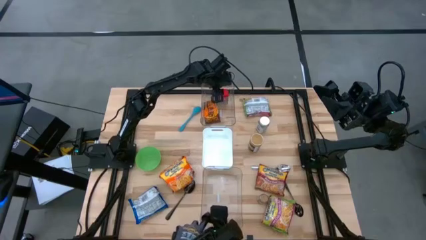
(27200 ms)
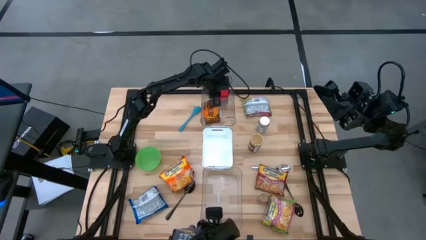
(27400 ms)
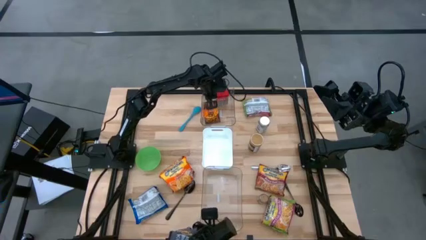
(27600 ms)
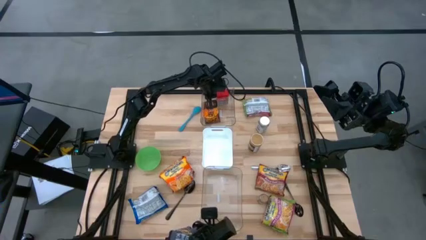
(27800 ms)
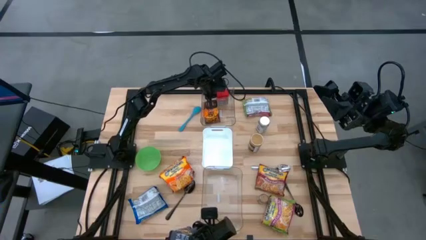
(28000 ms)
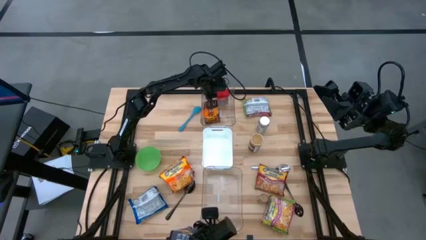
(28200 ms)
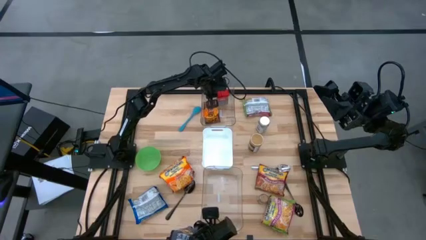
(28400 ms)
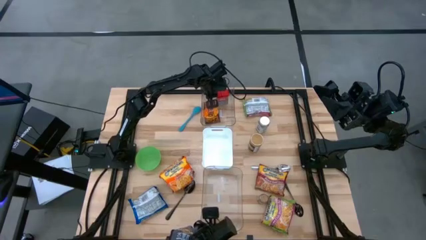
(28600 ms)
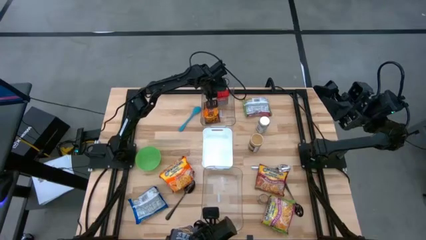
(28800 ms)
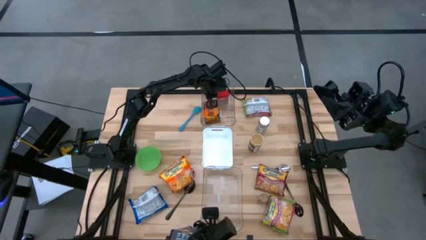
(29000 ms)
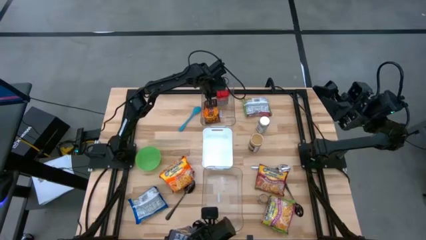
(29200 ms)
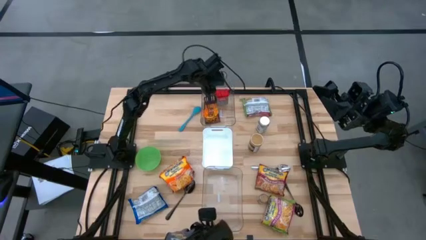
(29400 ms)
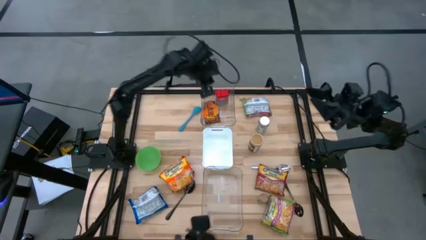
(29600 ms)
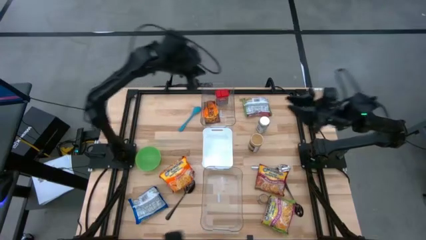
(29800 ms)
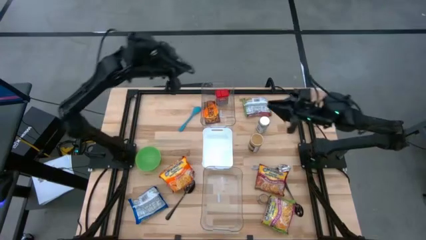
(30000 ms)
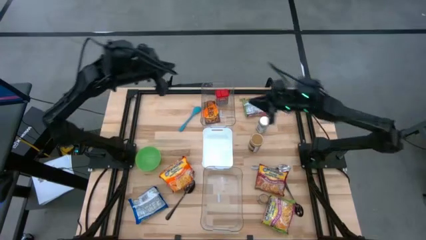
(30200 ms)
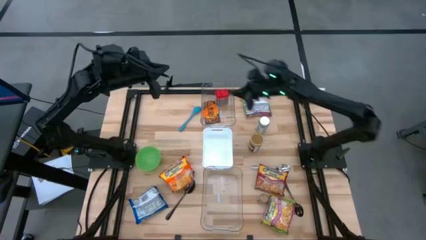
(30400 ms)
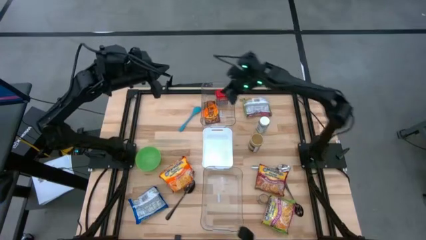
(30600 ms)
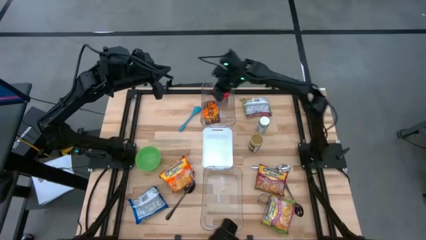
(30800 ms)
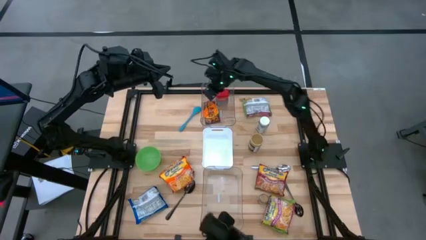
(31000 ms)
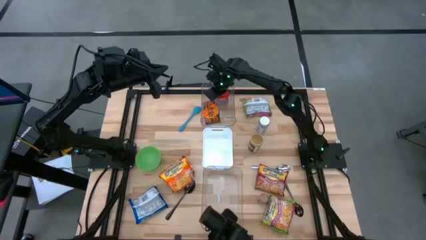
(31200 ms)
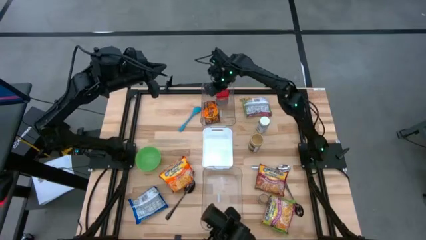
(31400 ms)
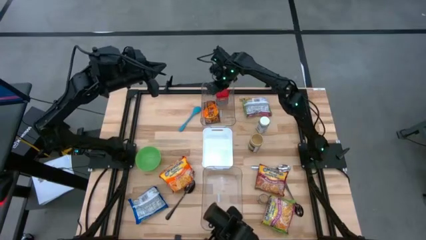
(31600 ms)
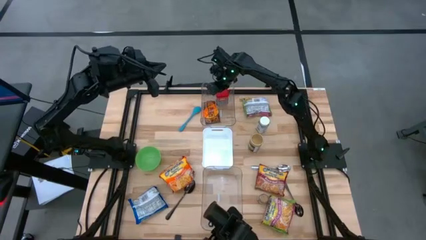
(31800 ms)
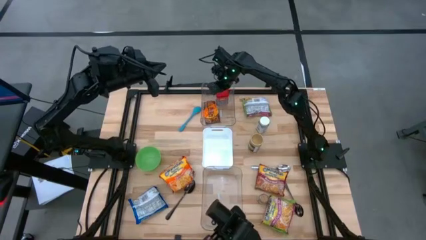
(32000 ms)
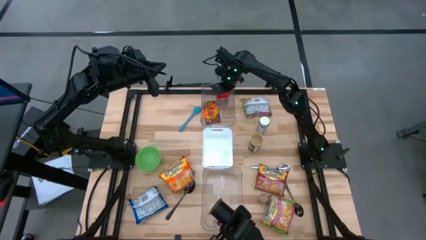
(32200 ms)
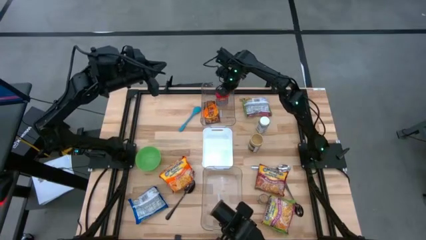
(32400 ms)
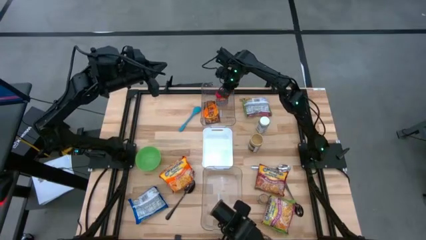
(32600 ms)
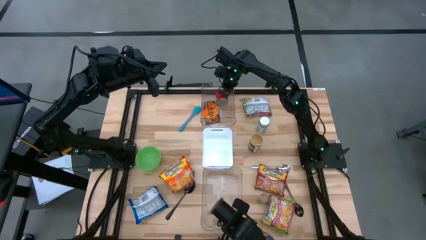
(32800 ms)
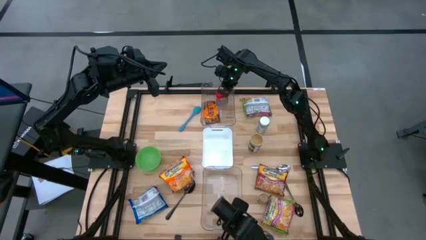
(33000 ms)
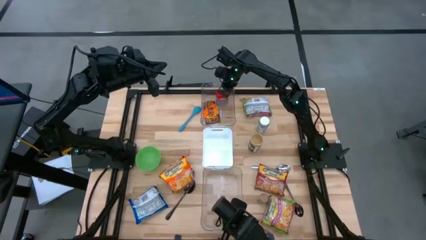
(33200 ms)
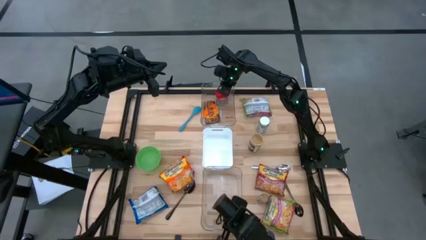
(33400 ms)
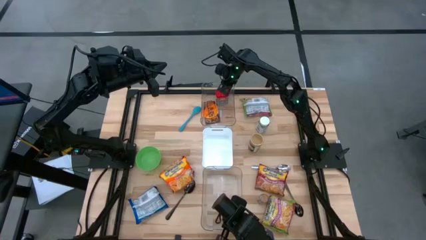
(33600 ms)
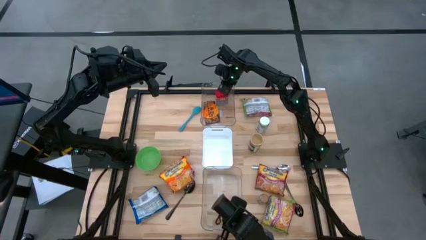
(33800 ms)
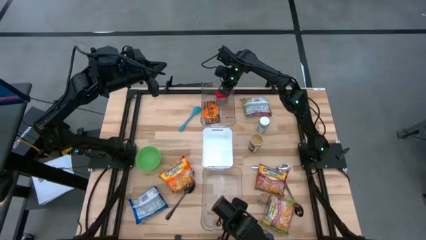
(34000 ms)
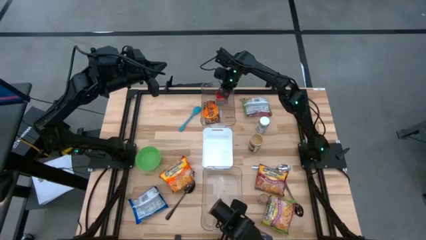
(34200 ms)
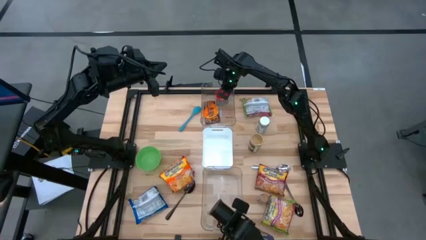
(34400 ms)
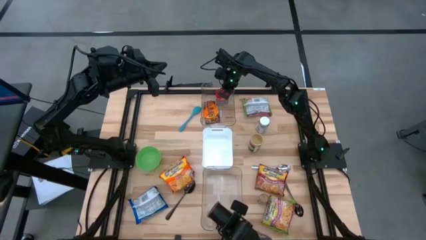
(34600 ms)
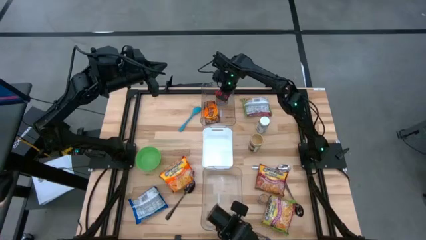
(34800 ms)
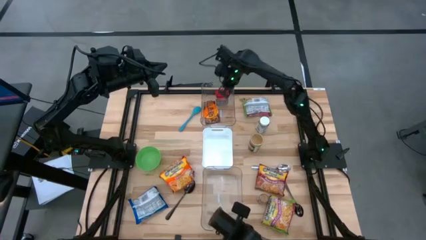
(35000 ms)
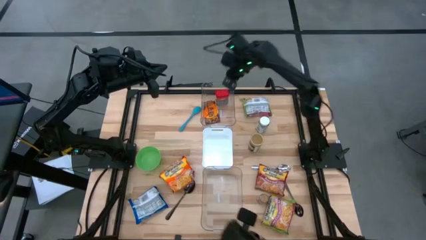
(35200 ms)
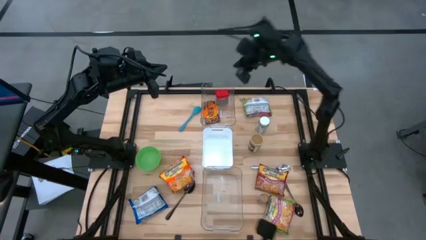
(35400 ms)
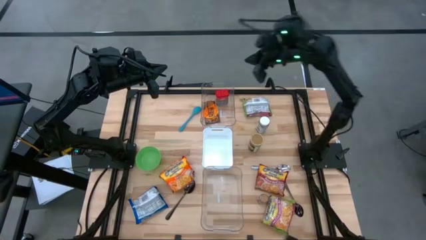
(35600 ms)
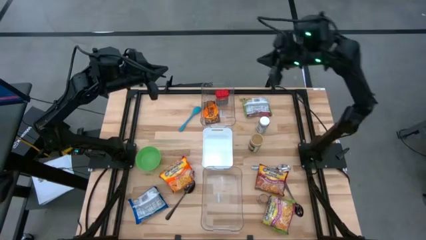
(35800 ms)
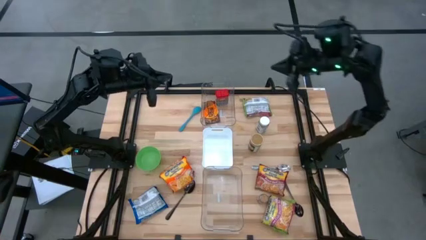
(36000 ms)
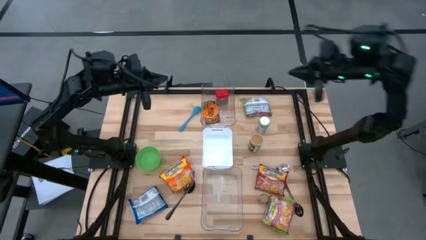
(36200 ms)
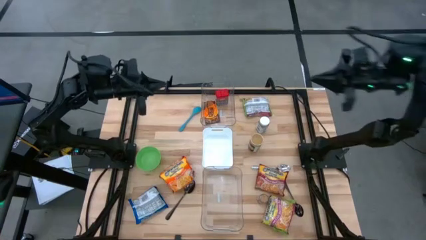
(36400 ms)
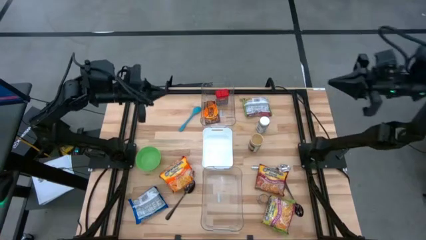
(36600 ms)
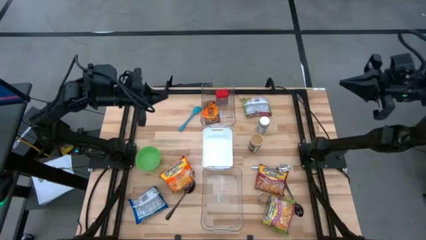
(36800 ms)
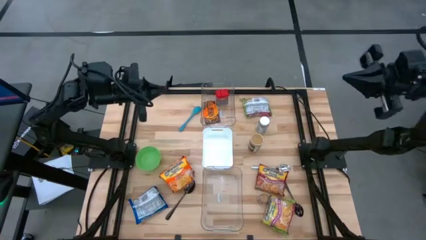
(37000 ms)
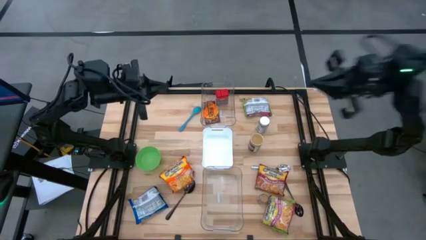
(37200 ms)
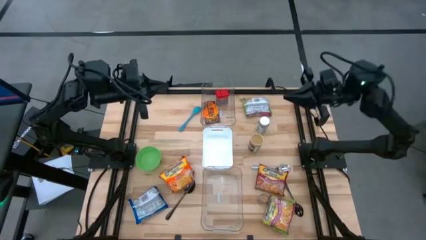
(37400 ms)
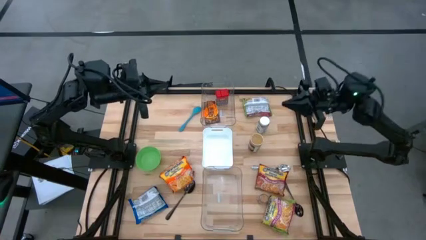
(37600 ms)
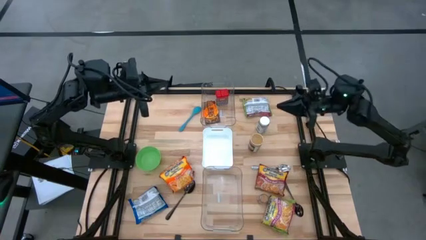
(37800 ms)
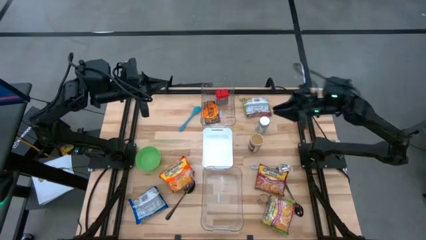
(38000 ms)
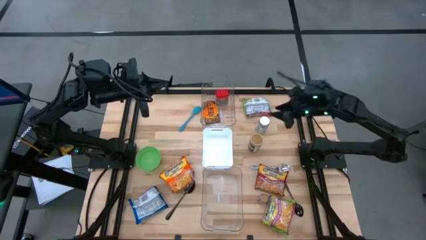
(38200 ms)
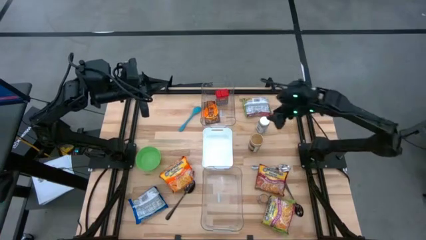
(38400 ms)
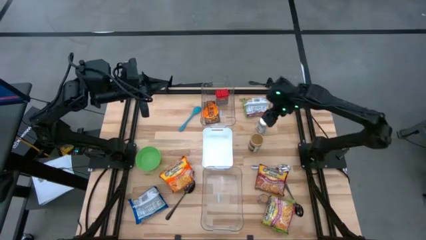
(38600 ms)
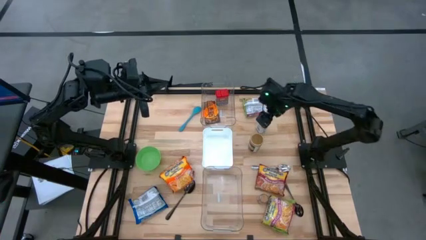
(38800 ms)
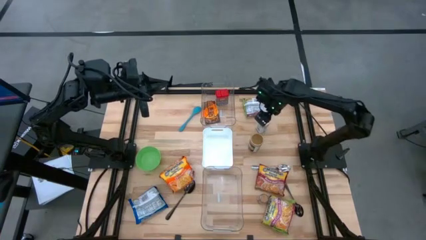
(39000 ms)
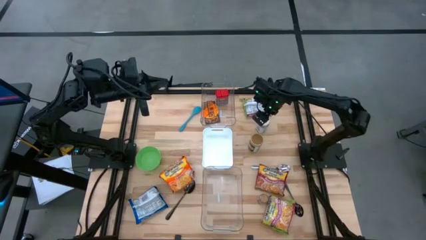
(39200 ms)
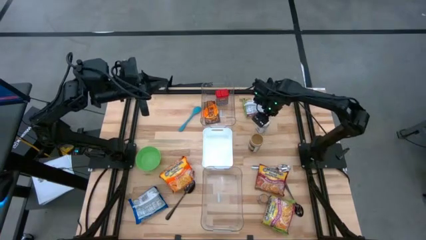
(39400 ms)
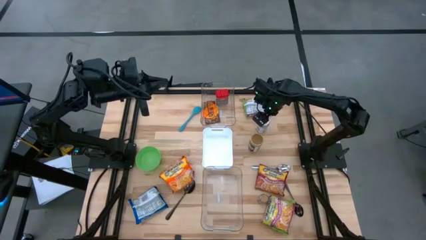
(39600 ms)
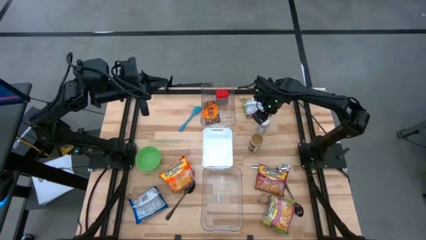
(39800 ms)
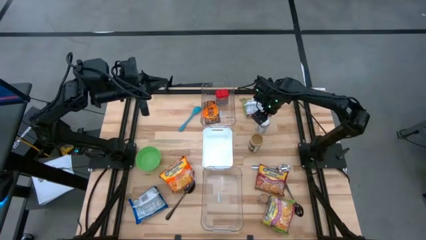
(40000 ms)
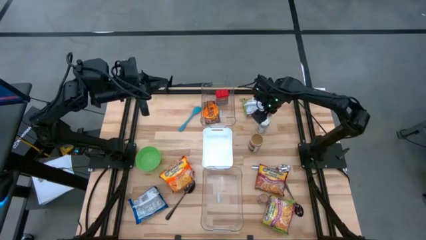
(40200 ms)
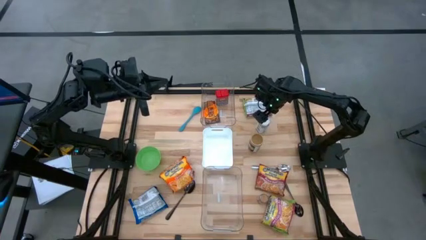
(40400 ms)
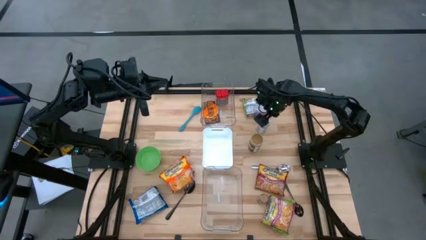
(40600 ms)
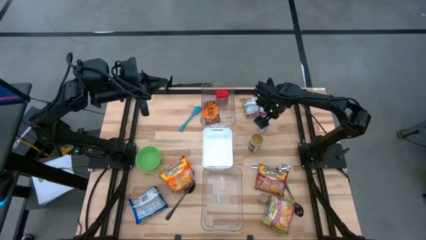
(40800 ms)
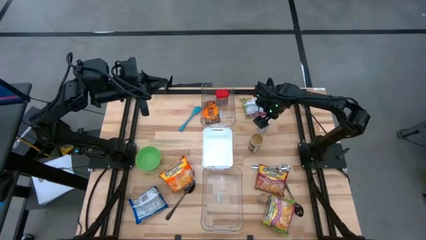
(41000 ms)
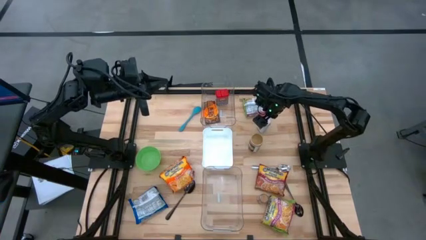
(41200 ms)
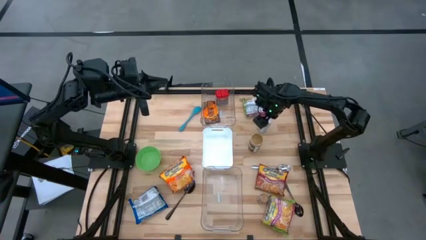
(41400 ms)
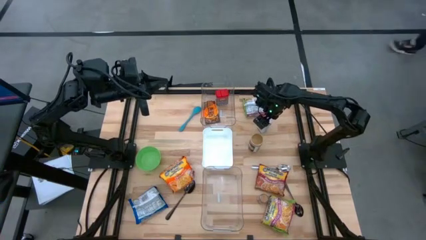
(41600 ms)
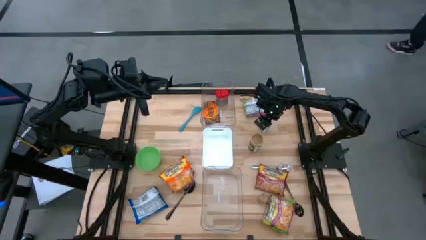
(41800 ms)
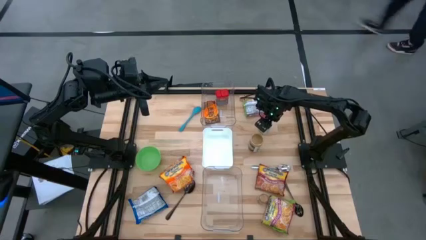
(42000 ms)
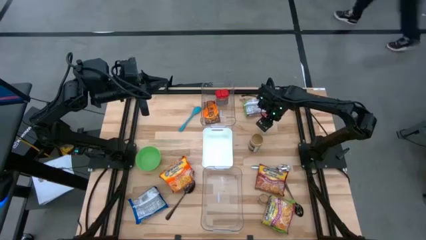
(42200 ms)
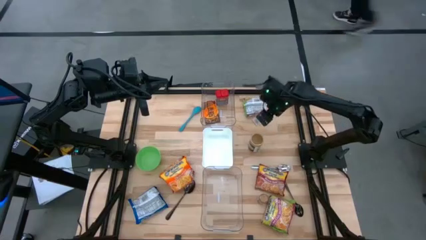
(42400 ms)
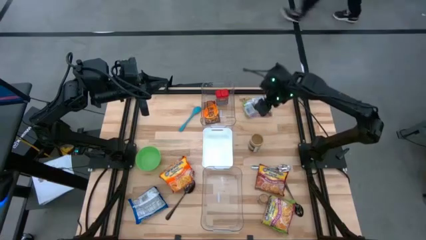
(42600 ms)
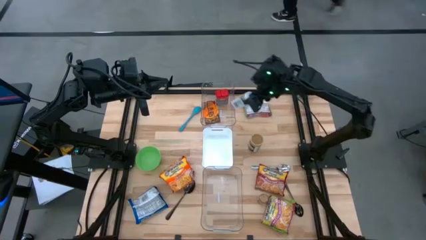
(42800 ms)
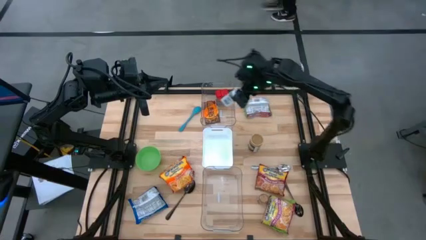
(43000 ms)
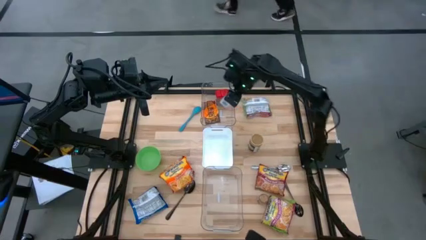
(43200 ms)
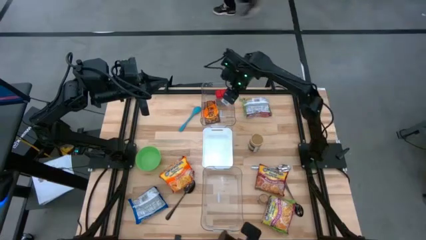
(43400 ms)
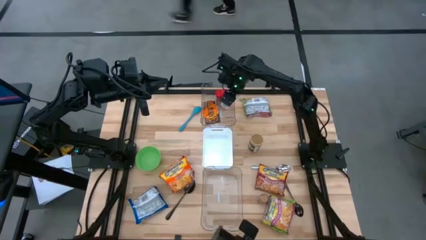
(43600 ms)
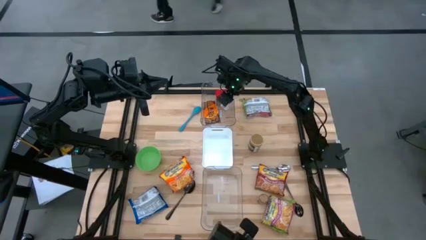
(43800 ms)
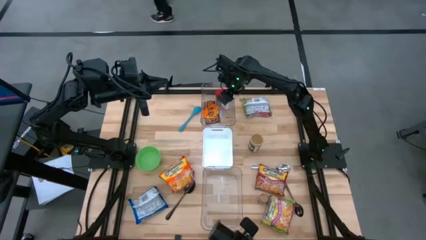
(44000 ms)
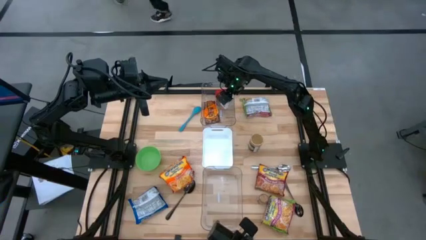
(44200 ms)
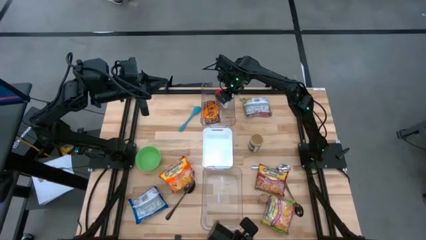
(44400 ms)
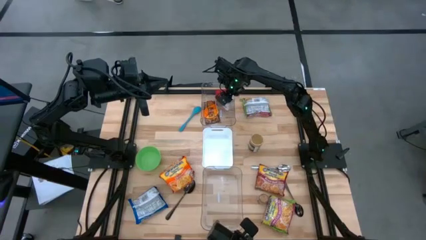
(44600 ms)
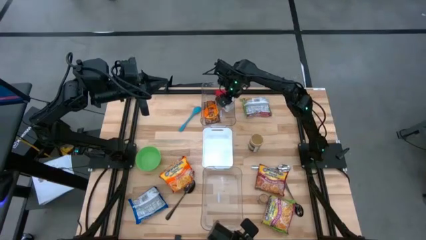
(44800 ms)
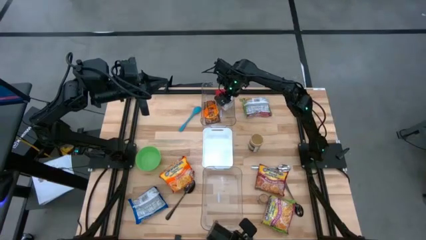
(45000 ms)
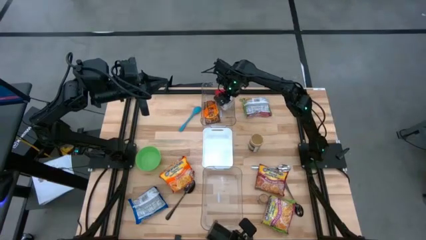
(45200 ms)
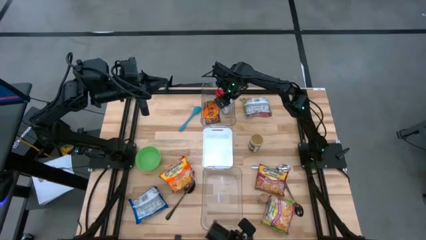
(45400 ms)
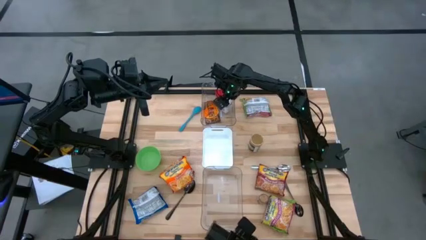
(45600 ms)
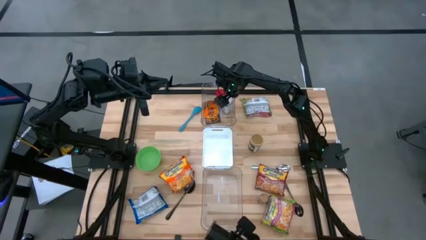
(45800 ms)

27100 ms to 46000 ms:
Task: Pick & Place Food Item
Put the white seasoning bottle into the top transparent bin
